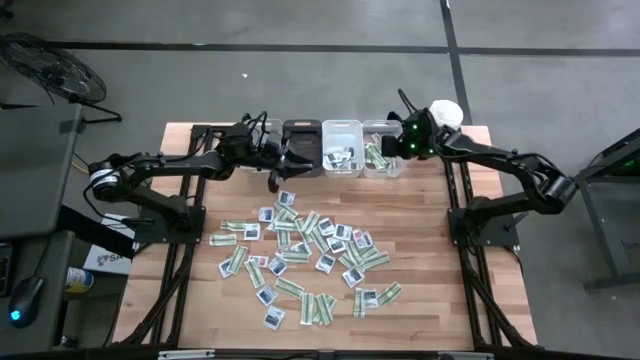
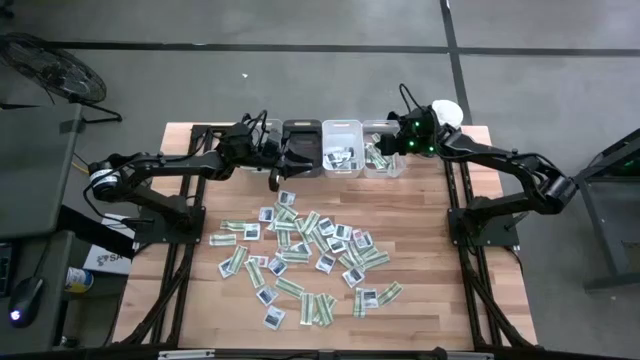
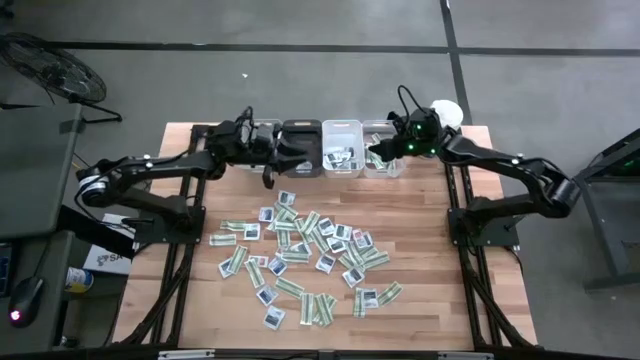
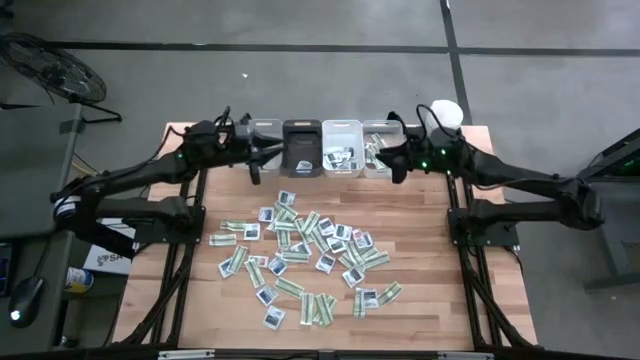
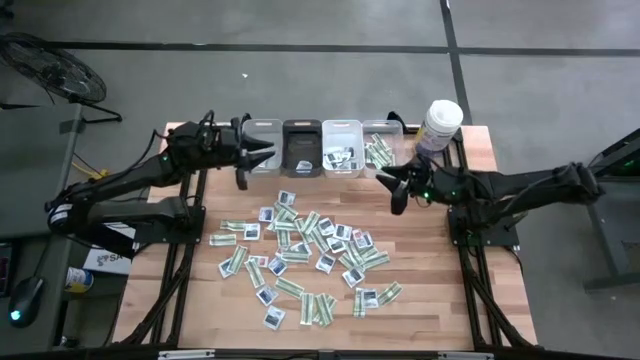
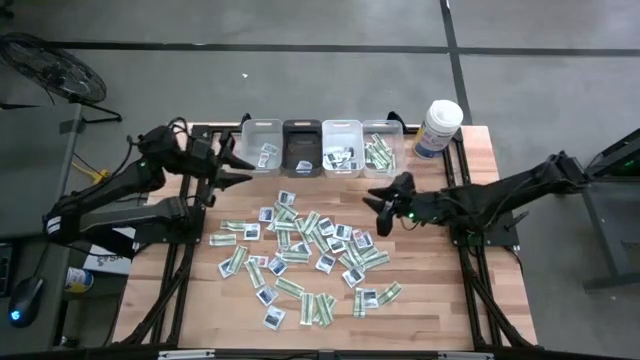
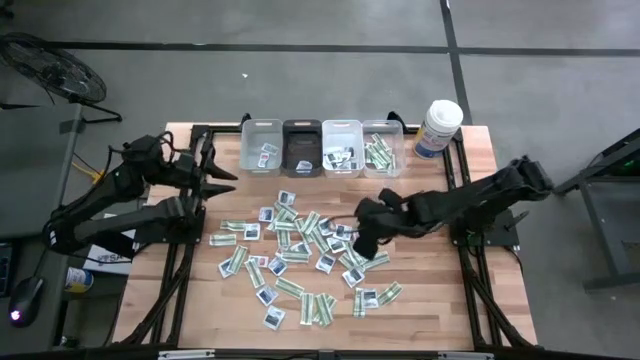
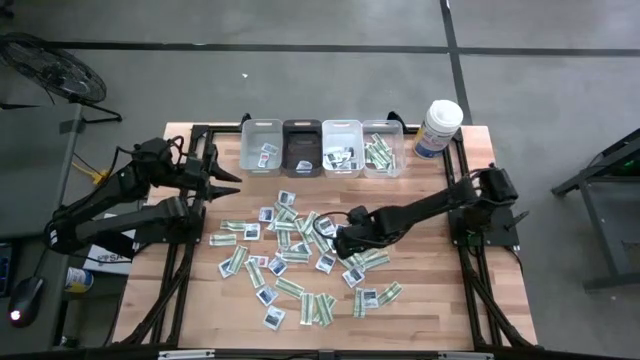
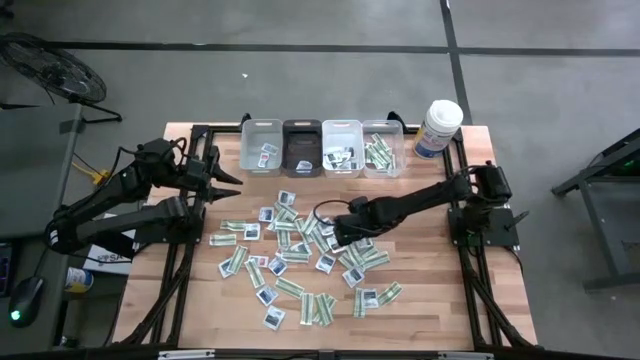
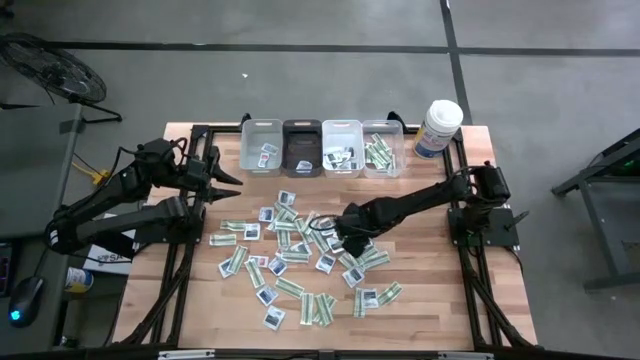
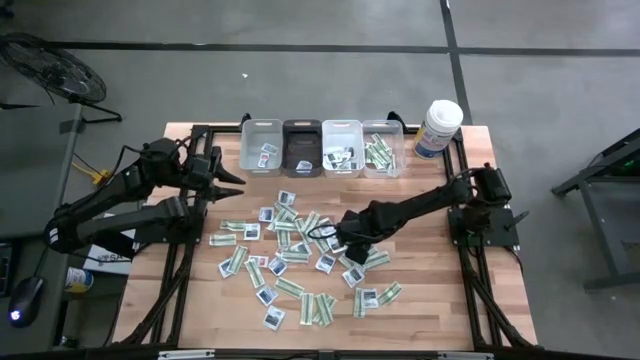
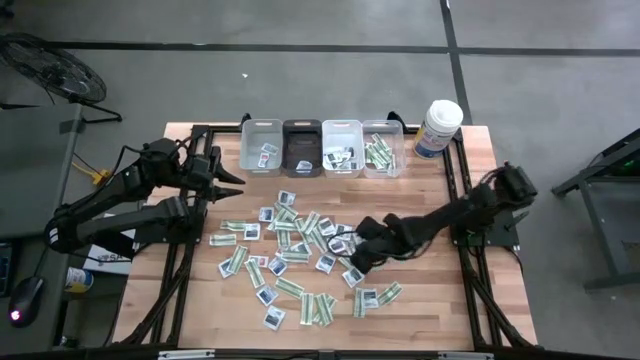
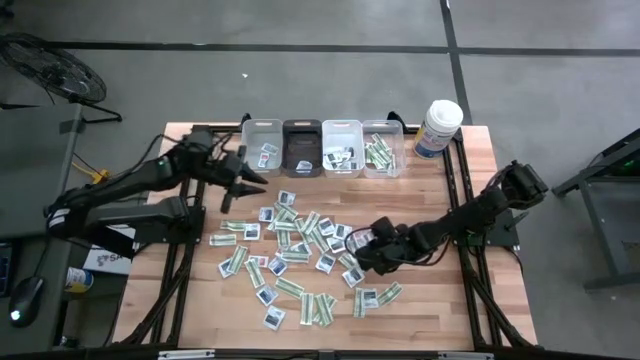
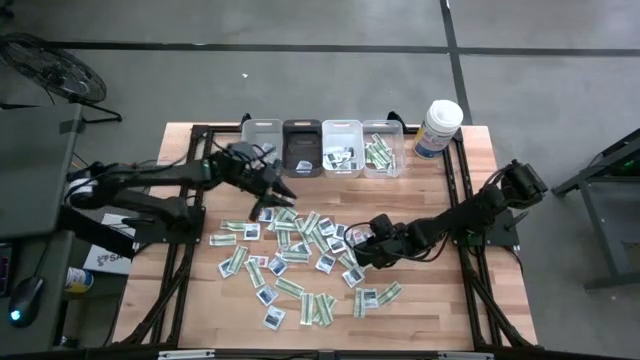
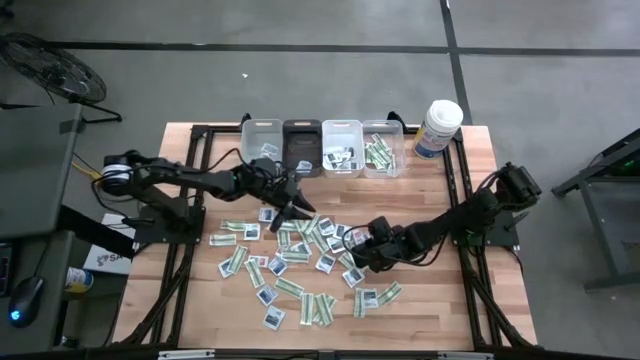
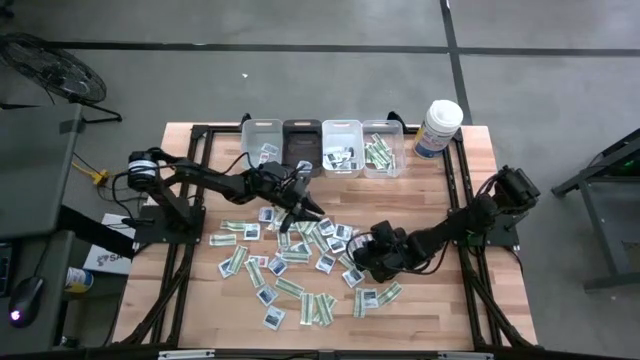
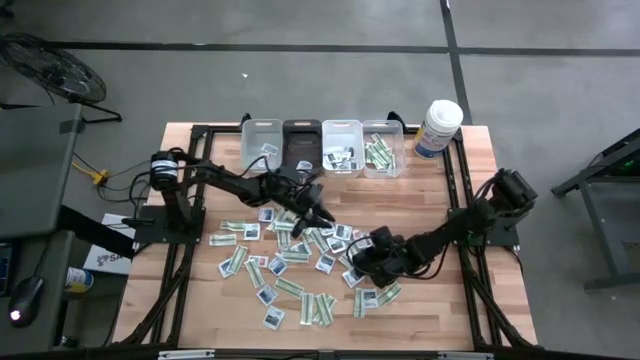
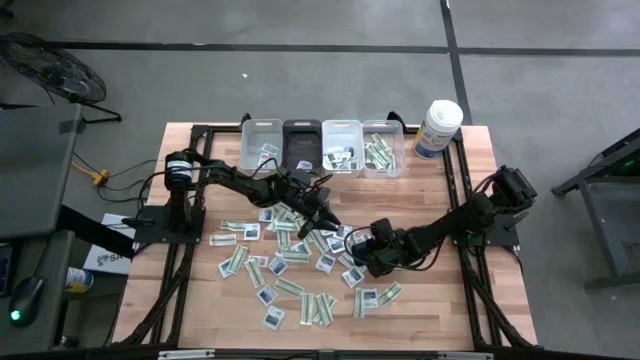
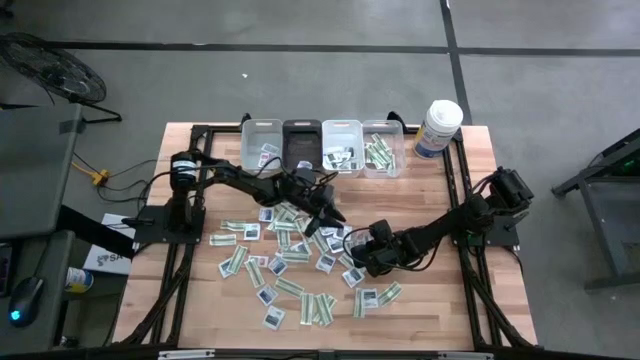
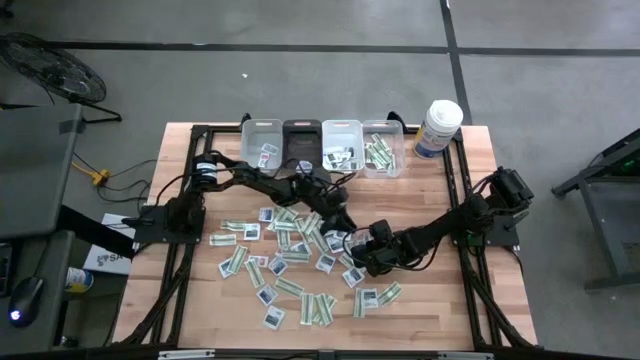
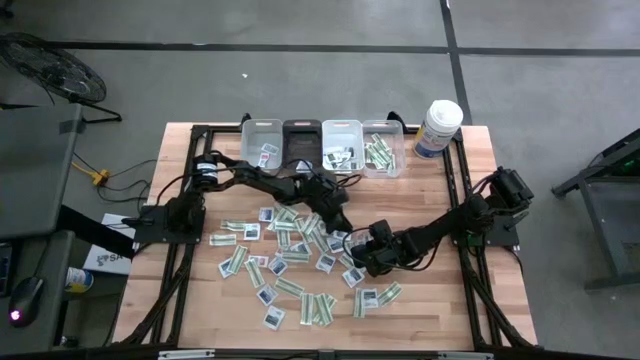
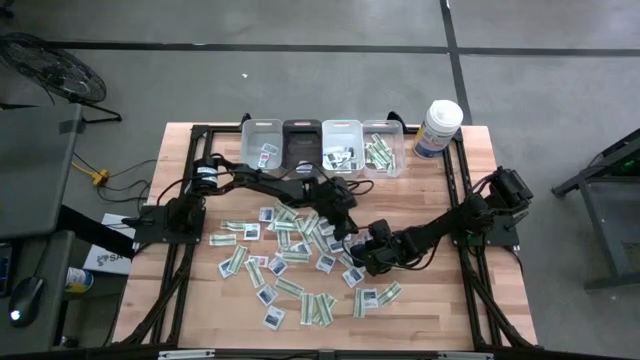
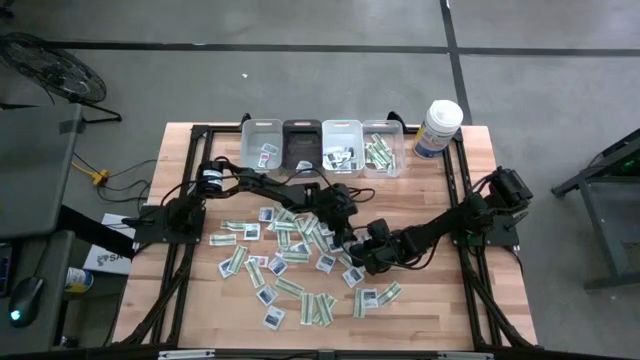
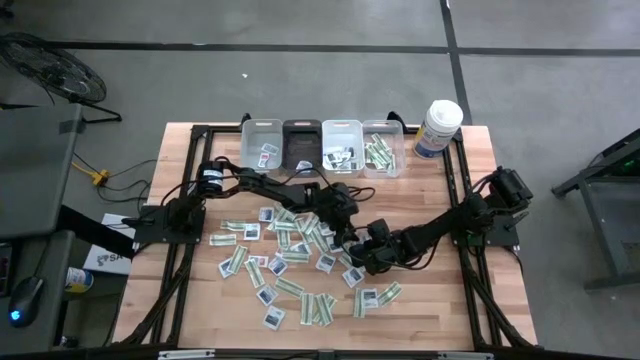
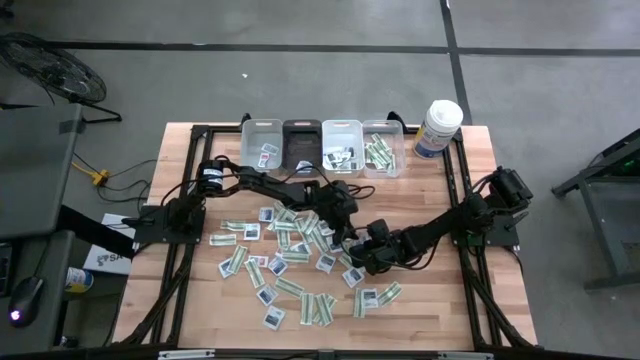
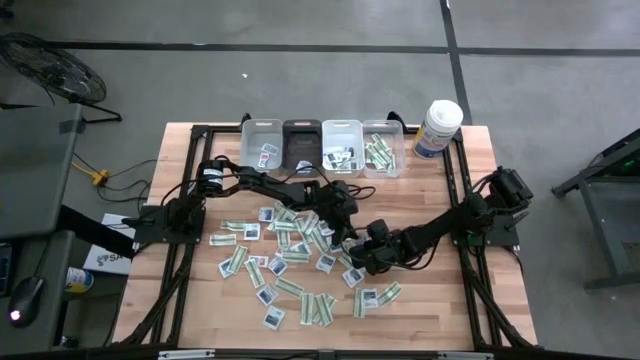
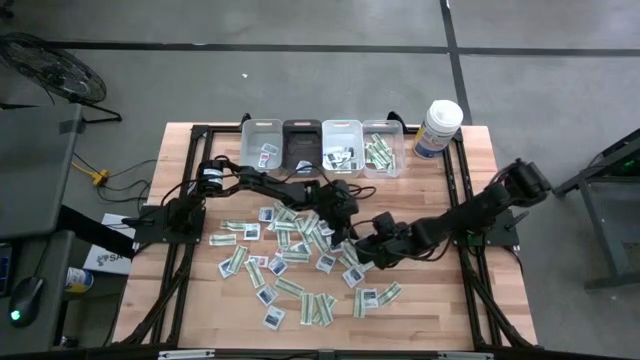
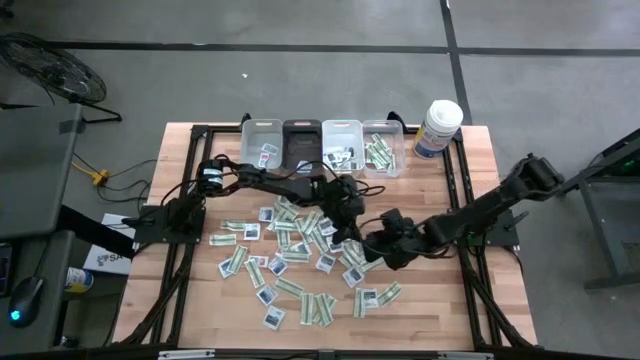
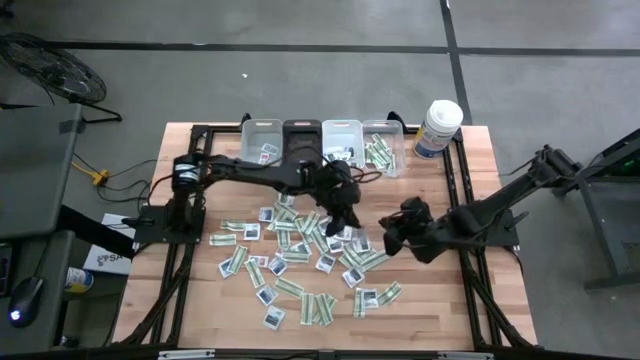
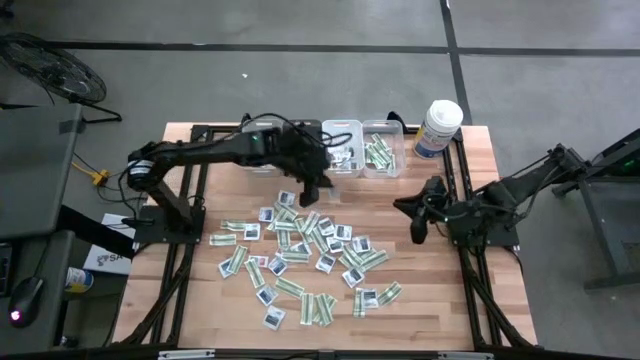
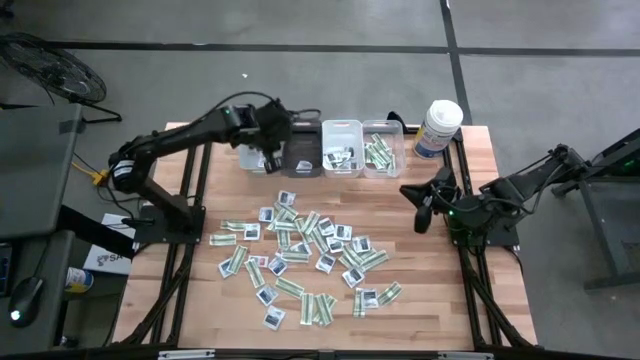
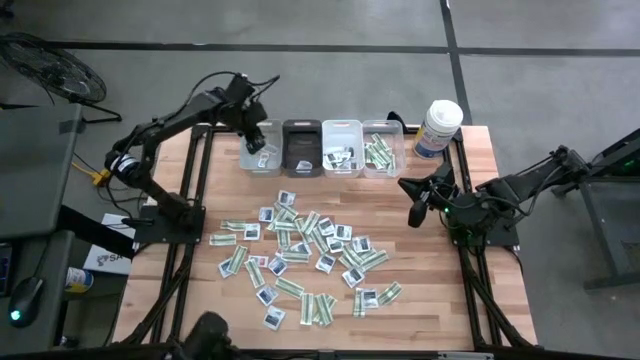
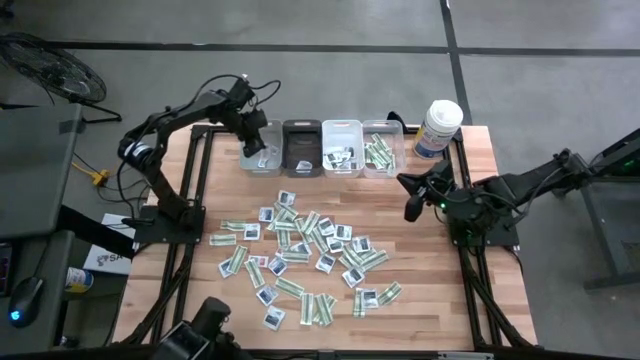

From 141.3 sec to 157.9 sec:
Task: Pick & Place First Aid Supplies
Put the orange ointment pack into the gray bin

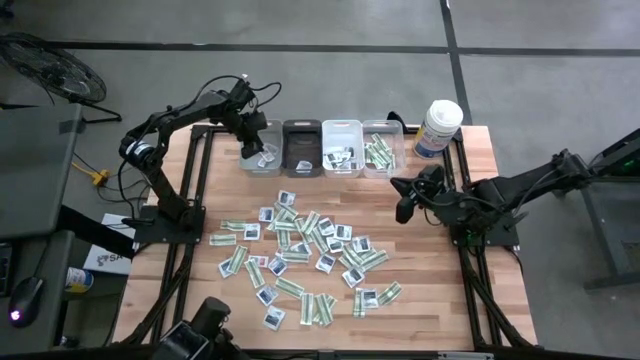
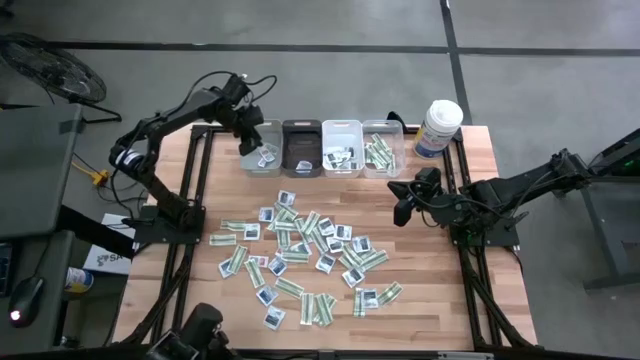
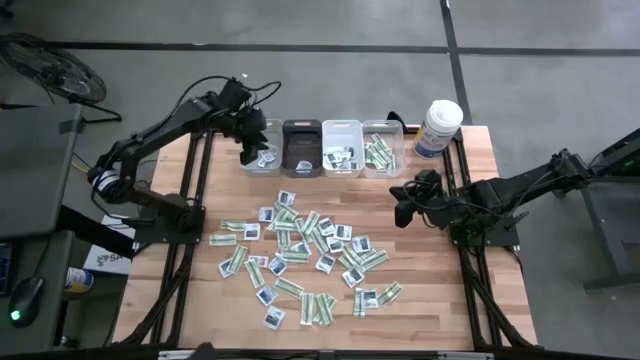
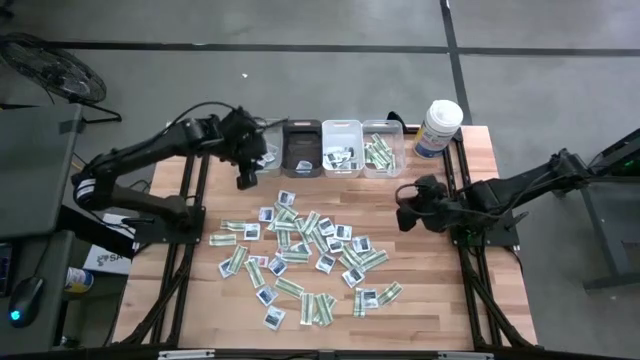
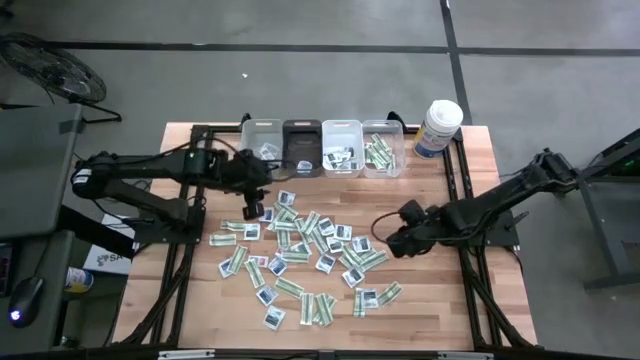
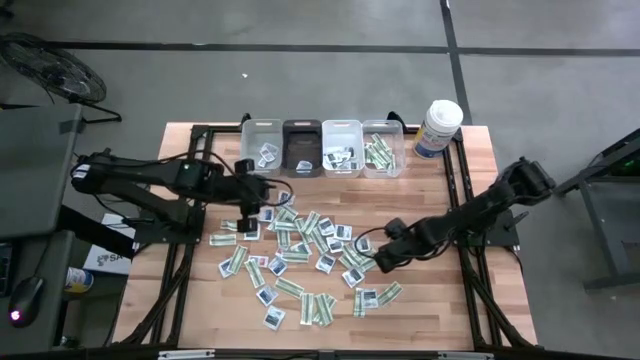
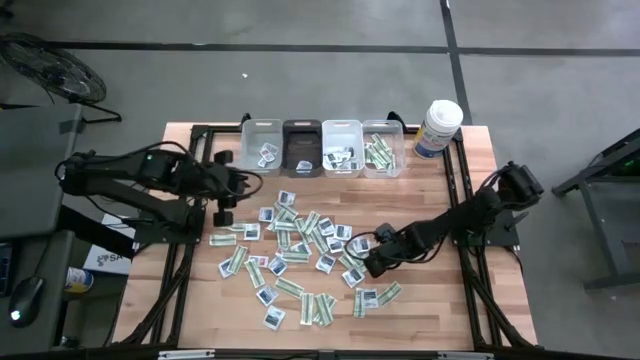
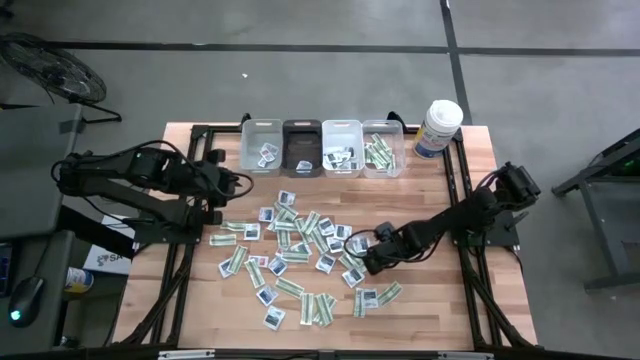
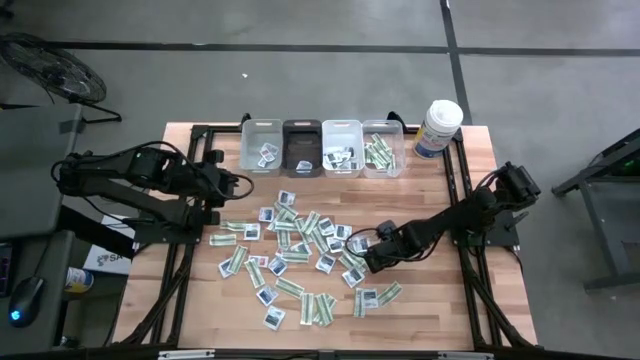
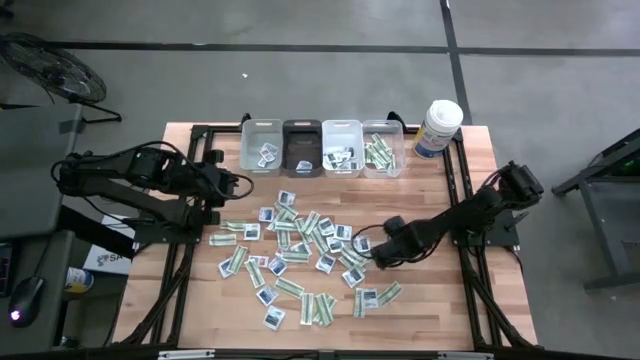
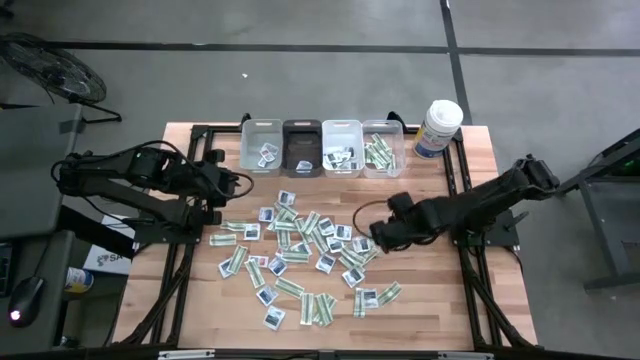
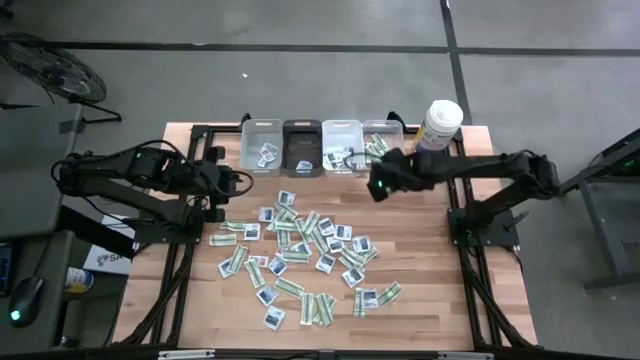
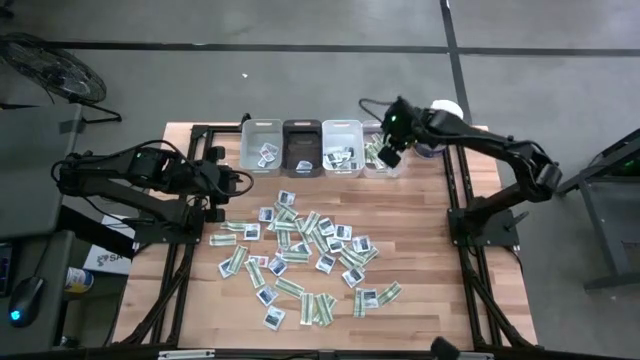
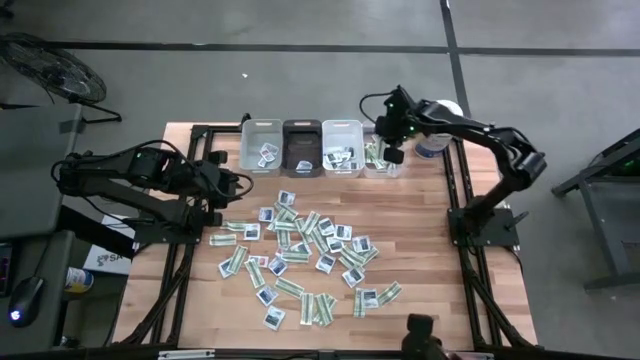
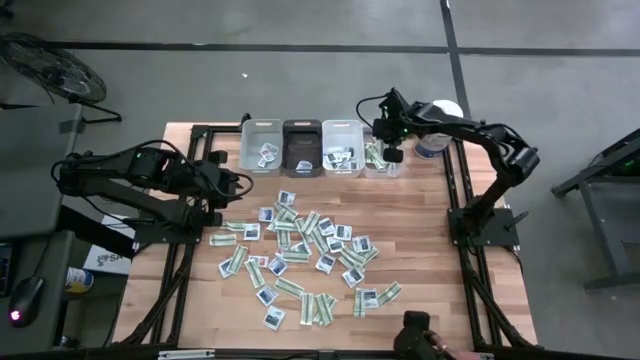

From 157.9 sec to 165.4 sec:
Put the green bandage into the transparent bin
